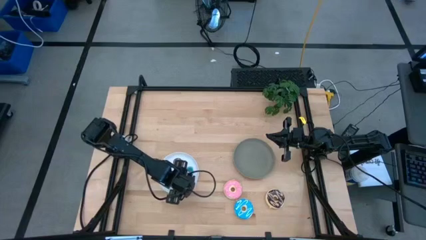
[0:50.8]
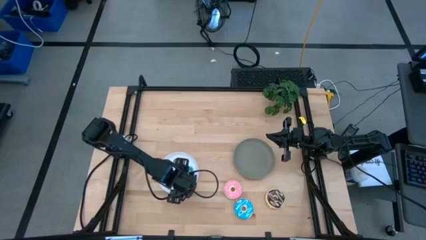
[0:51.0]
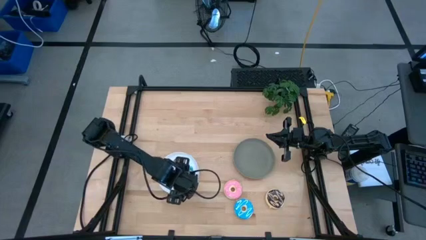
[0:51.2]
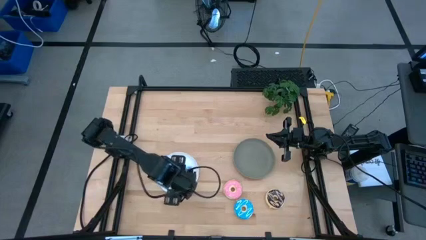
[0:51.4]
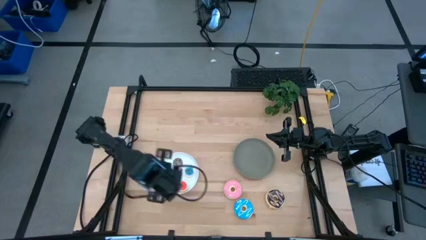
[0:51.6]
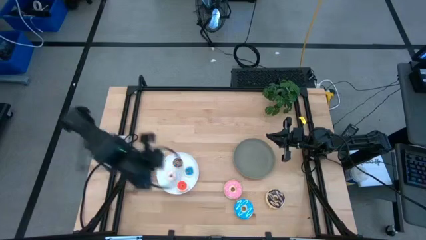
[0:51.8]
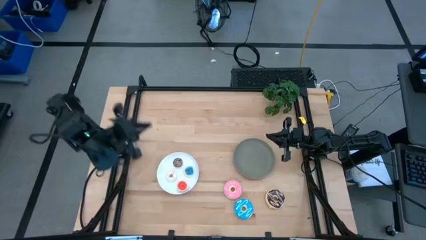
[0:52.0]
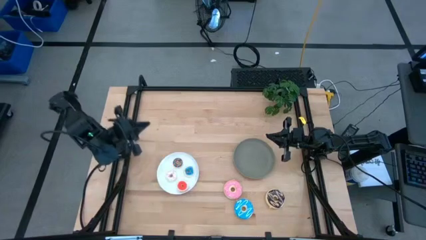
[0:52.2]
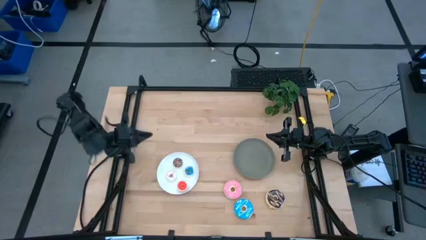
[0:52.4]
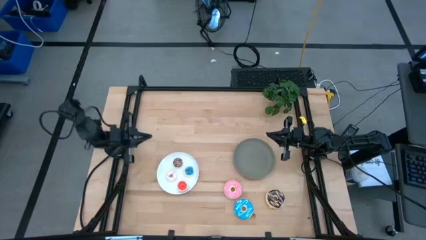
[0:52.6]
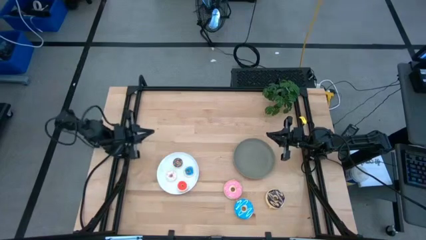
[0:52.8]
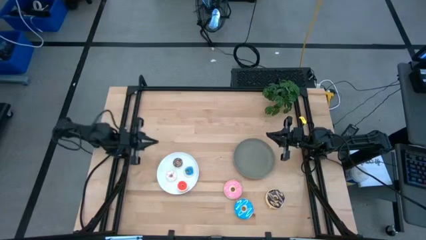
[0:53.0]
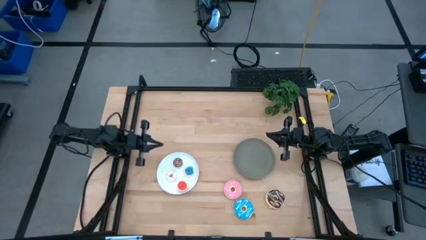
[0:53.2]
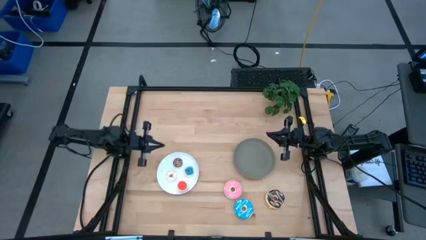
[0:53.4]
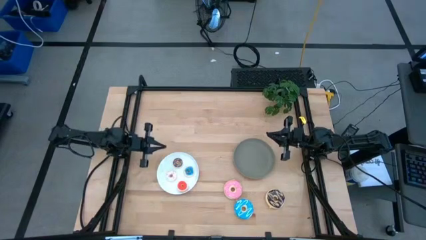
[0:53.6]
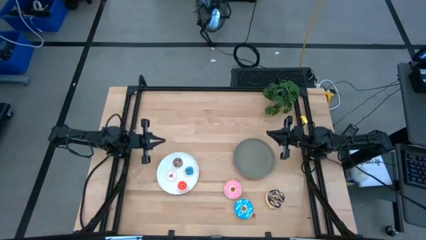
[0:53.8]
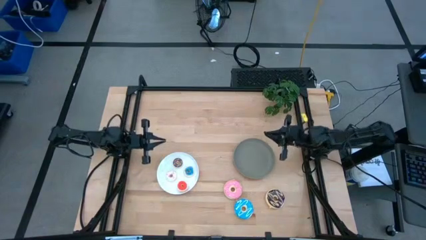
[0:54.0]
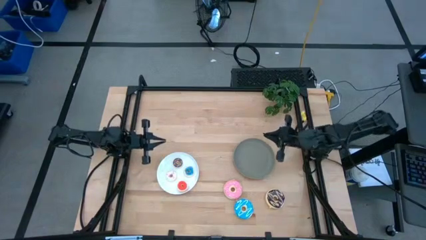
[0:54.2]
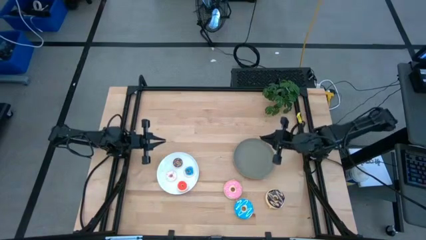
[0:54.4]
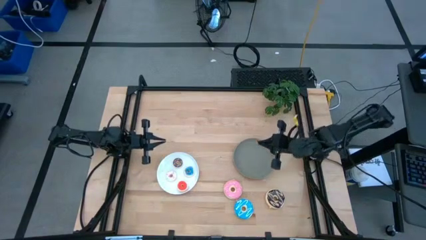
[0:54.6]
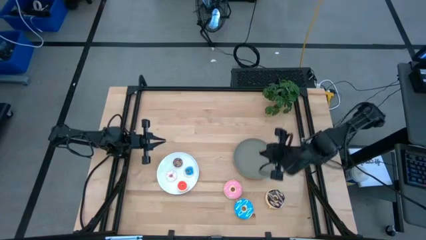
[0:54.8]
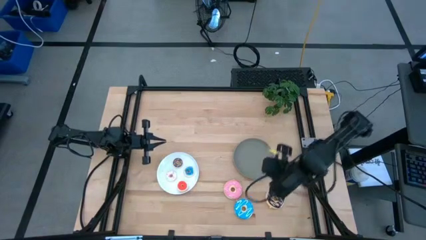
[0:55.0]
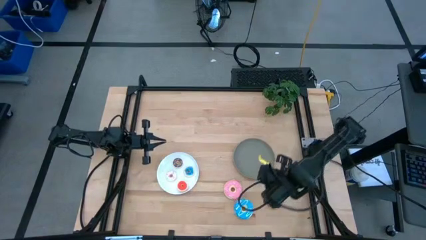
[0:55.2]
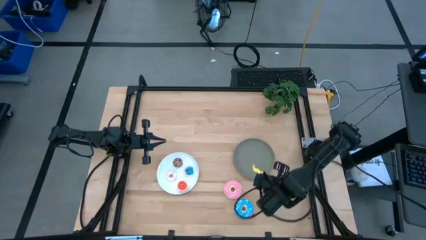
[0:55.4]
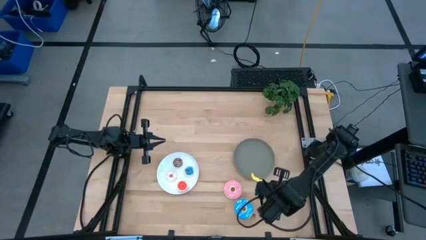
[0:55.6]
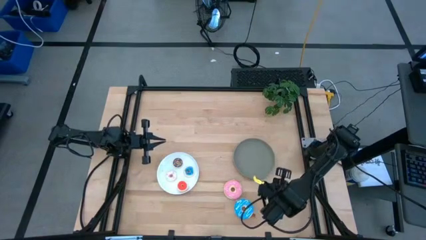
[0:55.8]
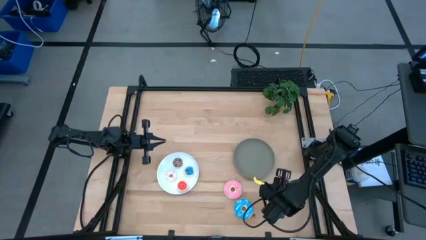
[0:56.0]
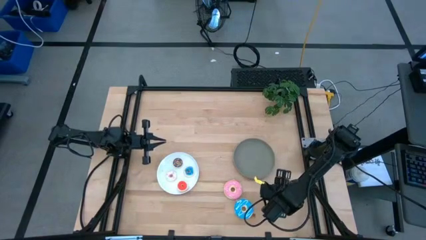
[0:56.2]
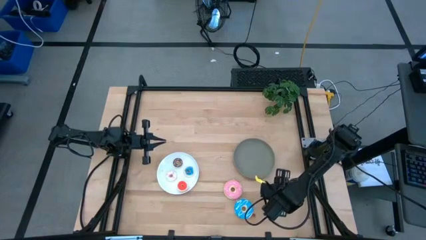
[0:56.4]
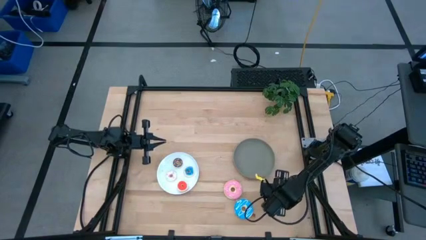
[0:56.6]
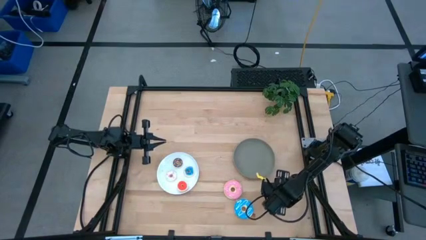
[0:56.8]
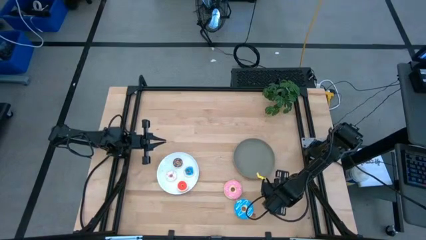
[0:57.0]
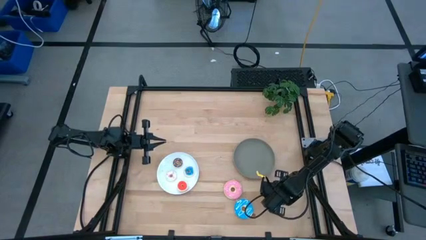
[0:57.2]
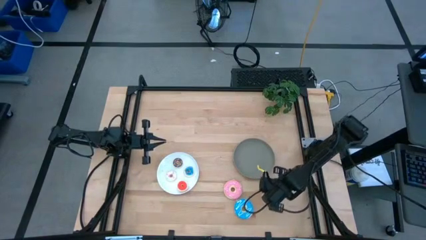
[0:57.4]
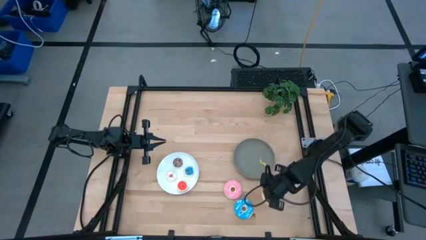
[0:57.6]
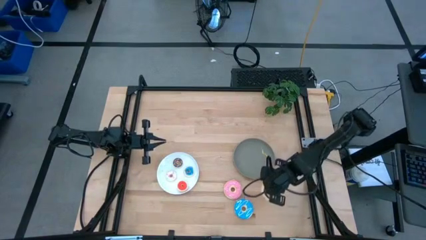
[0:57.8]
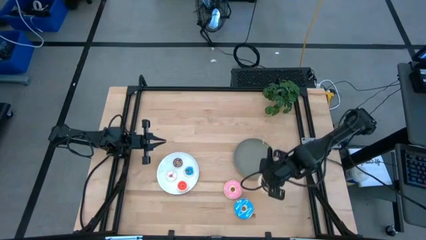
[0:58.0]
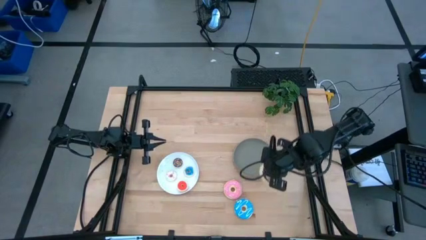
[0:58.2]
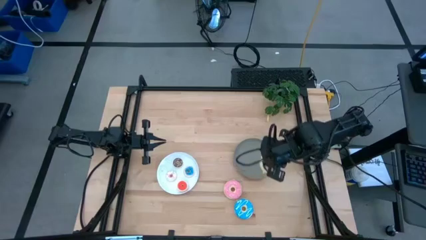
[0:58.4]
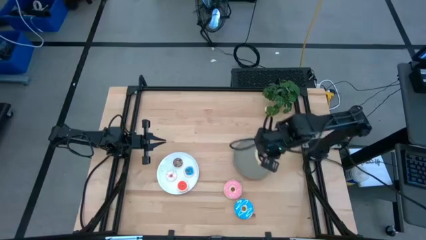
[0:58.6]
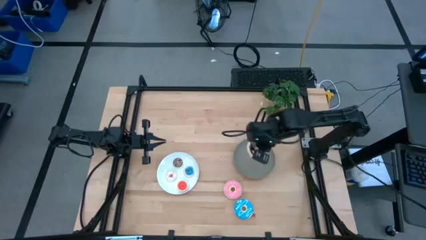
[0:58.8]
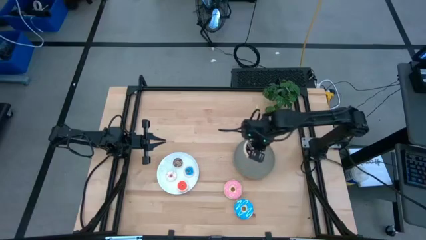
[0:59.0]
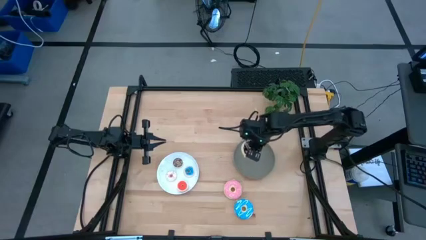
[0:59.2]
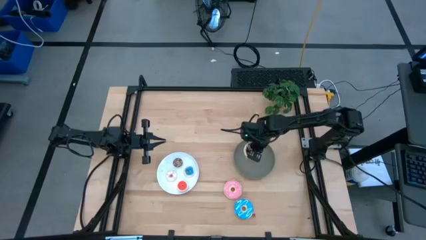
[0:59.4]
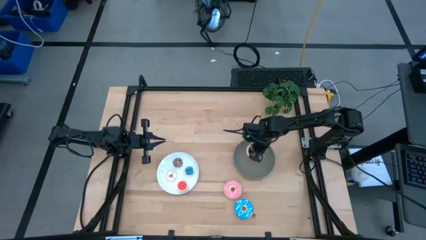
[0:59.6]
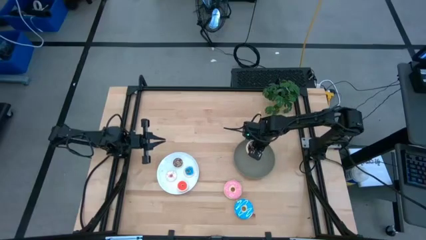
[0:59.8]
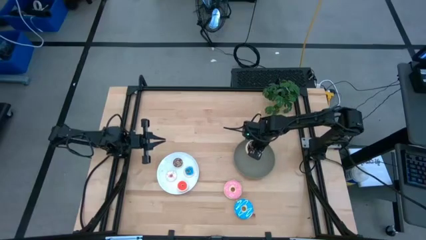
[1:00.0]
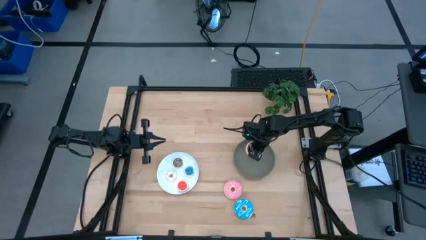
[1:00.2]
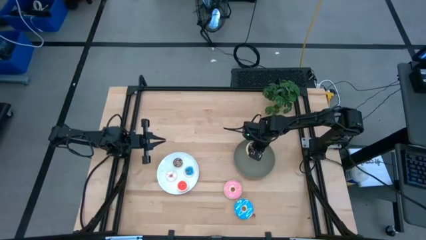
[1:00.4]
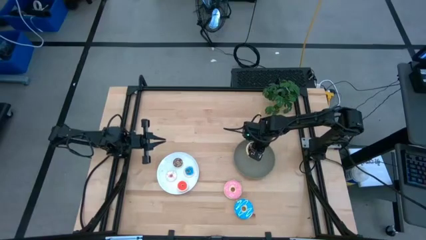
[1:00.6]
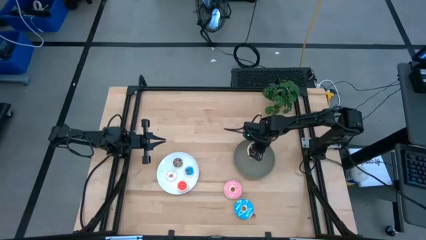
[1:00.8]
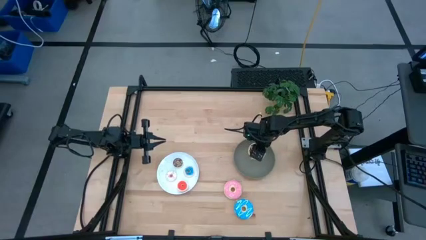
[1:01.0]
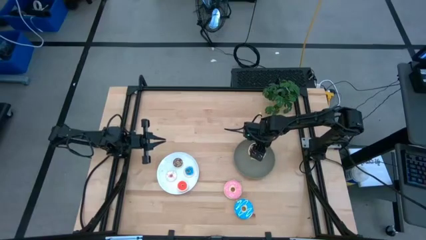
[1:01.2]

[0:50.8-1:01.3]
Task: Pick & Place donuts
Put the big black donut on the gray plate

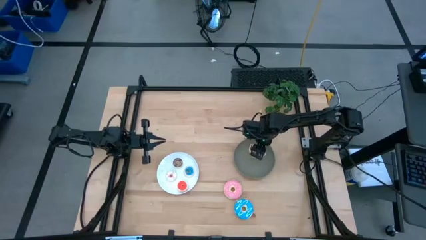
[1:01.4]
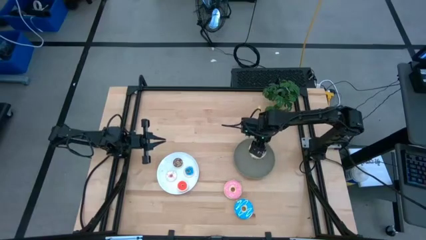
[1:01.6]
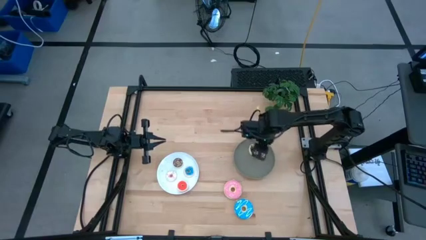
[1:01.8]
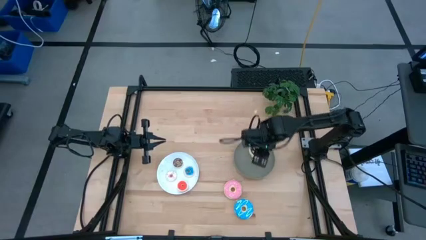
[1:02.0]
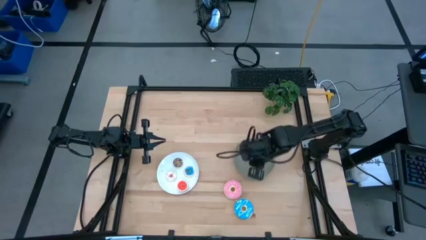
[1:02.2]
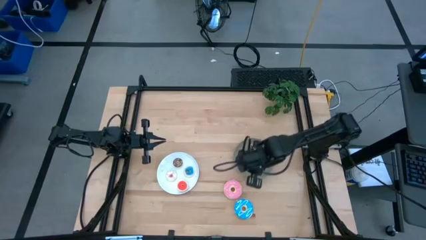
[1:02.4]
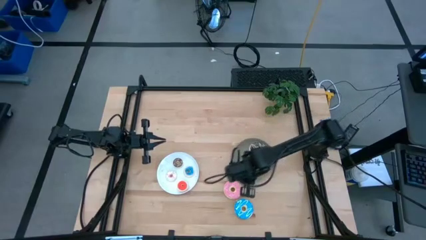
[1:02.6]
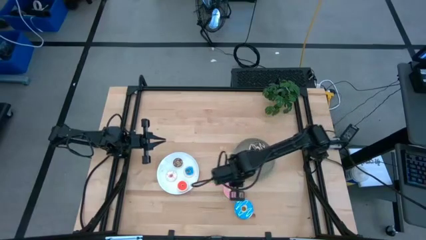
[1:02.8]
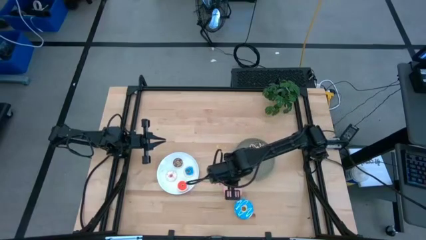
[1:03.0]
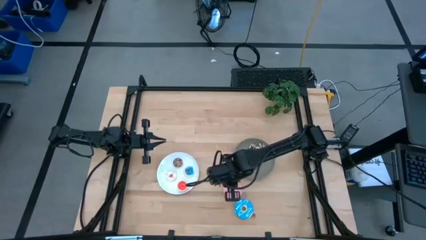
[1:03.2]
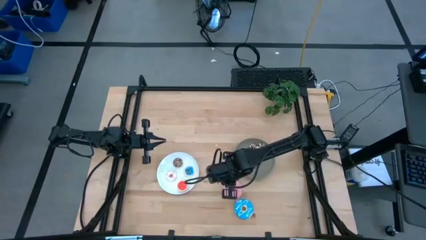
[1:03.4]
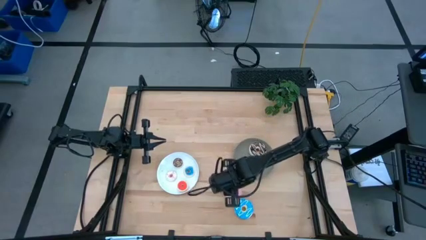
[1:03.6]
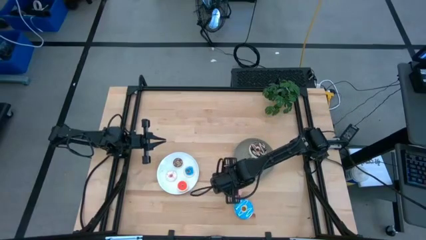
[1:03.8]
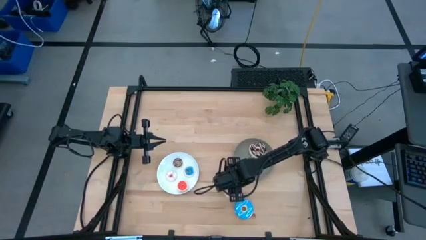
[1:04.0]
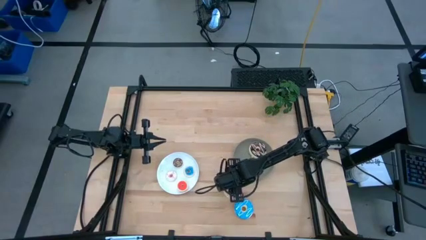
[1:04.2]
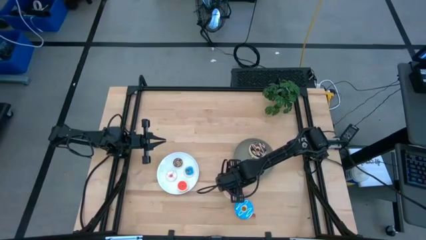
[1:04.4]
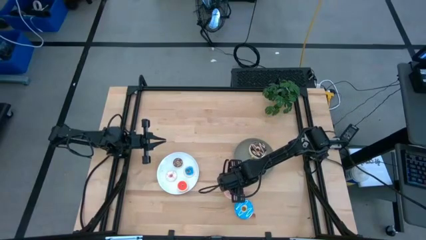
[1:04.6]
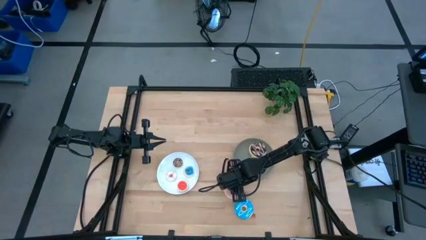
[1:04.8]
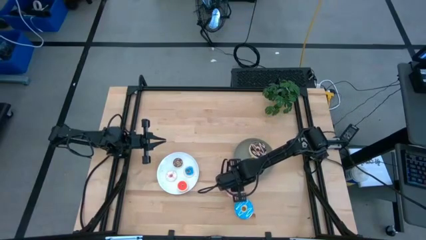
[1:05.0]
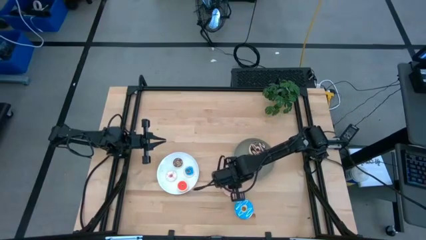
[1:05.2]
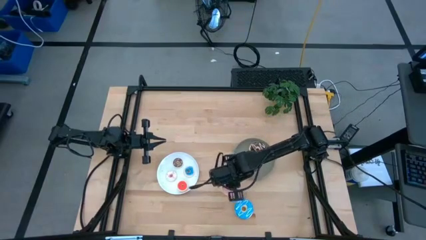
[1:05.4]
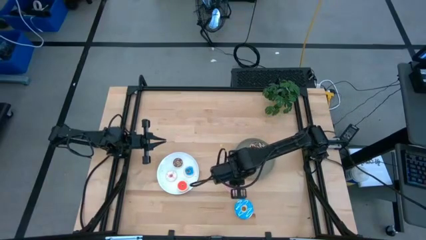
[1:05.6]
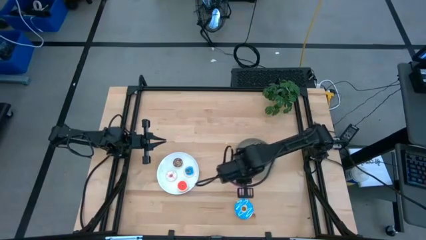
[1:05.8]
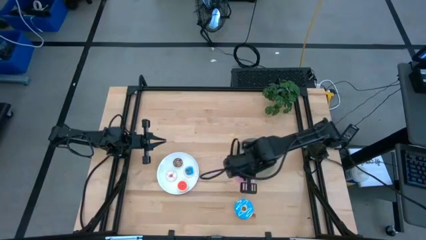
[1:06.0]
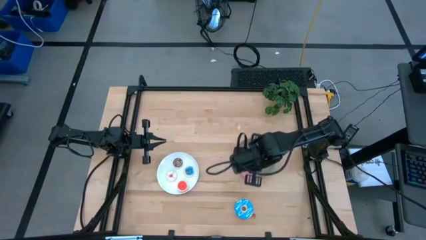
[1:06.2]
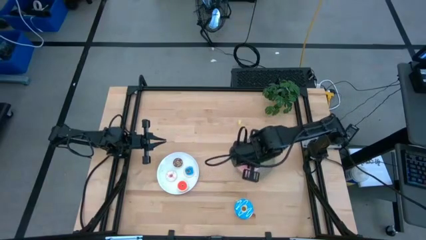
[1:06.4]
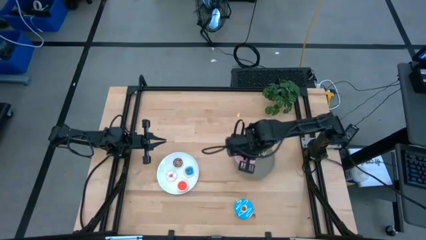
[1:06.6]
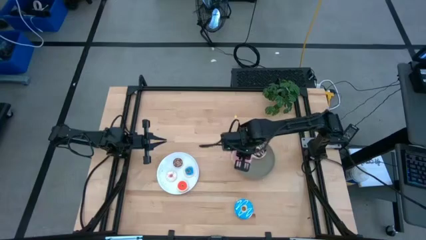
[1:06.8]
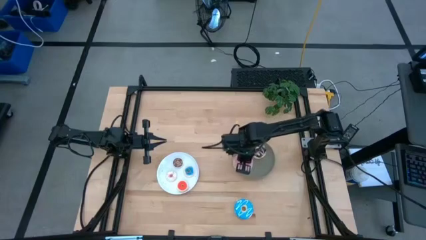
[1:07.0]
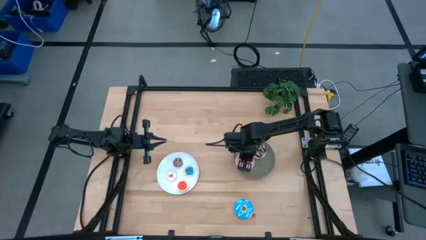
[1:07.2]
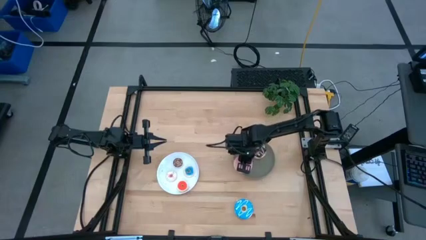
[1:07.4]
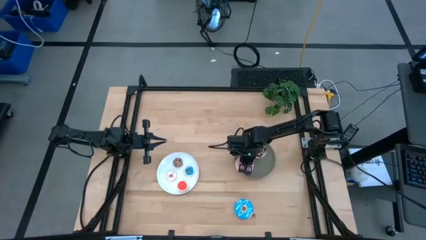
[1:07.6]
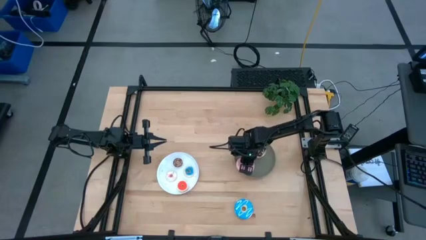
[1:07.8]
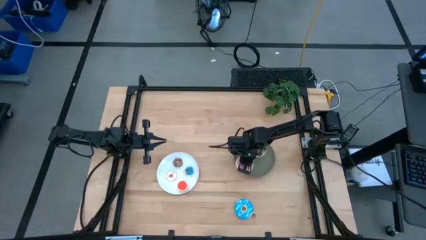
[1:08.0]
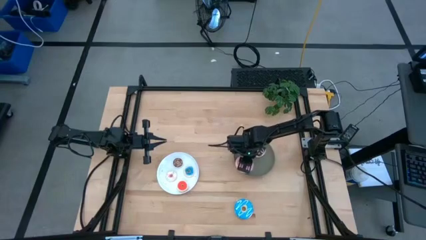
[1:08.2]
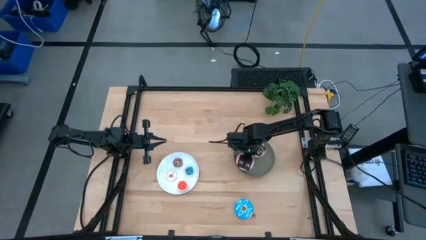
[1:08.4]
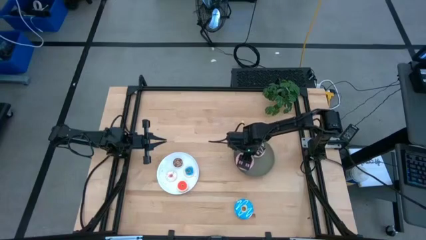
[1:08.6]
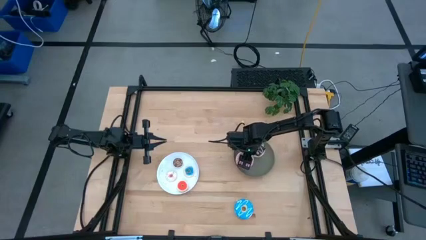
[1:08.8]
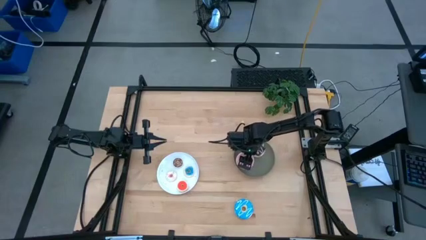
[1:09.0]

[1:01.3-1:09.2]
Put the big pink donut on the gray plate
